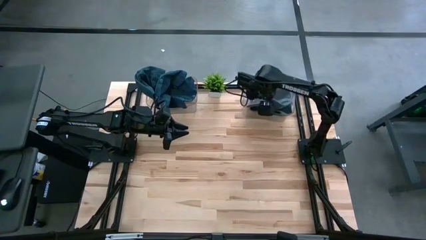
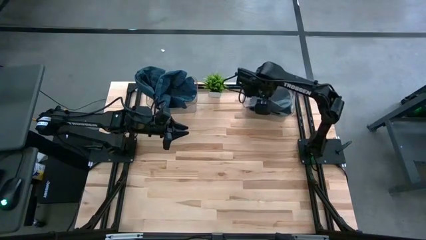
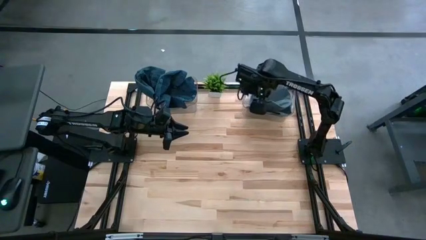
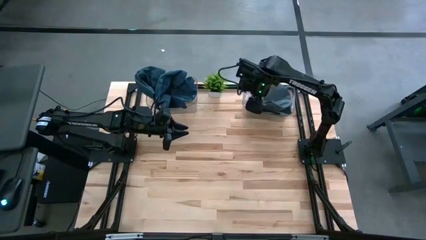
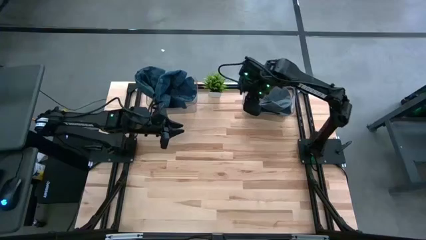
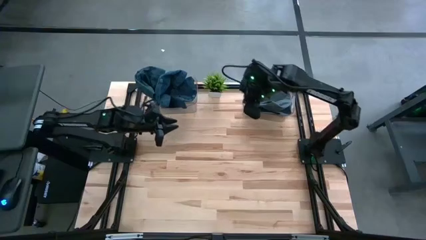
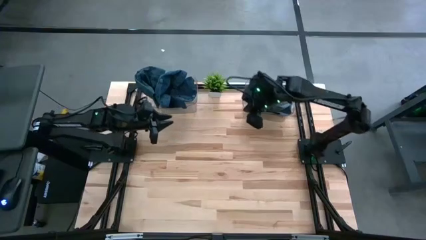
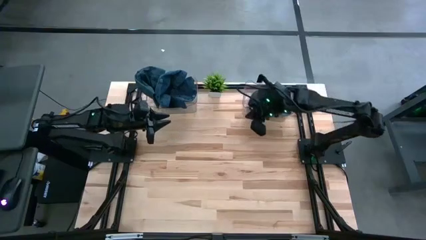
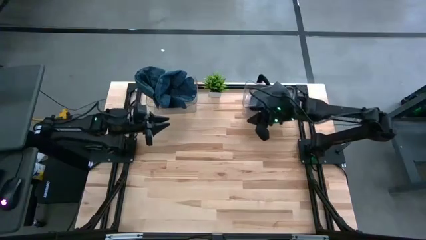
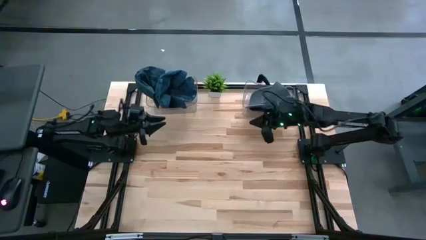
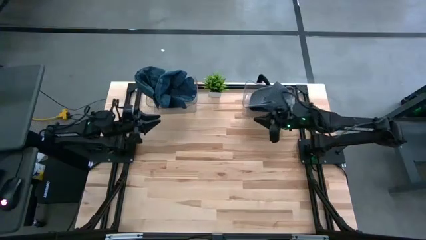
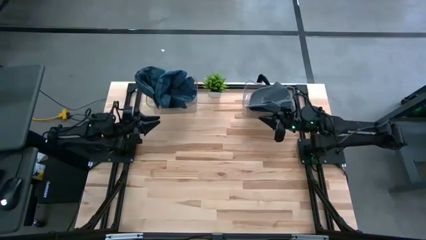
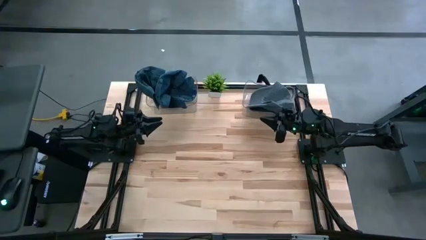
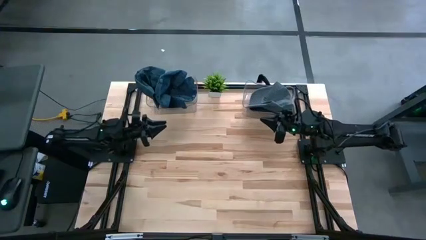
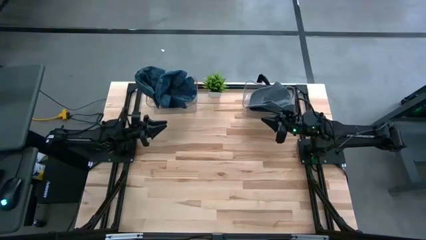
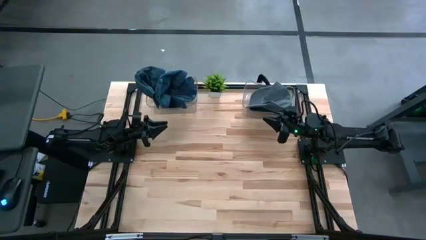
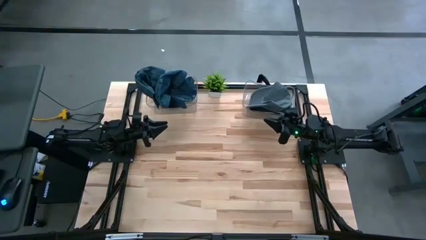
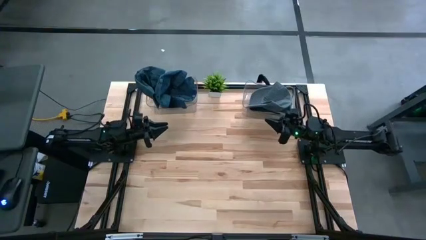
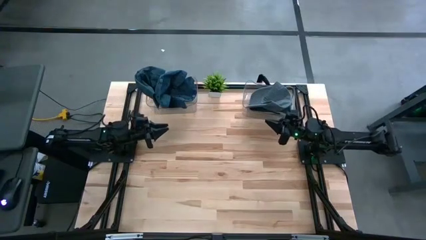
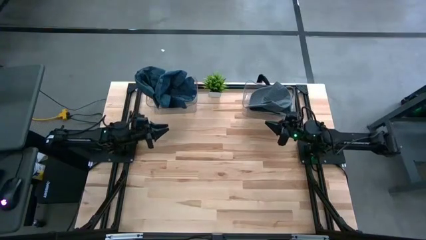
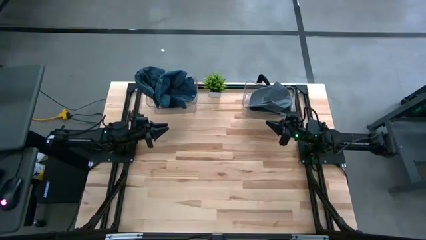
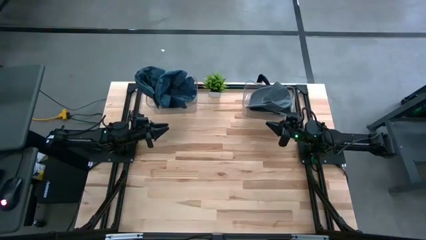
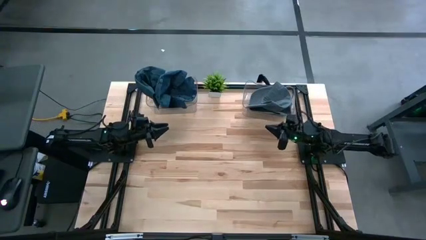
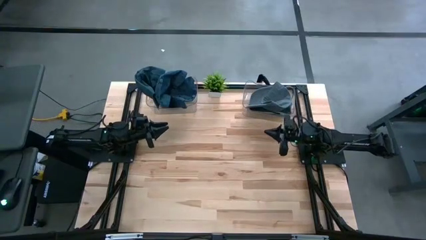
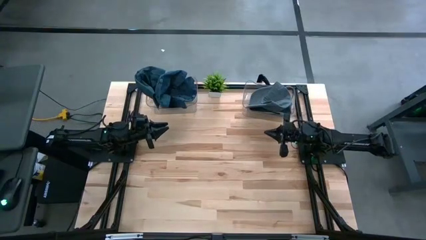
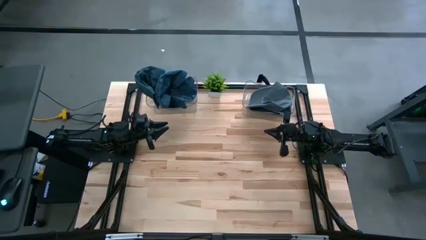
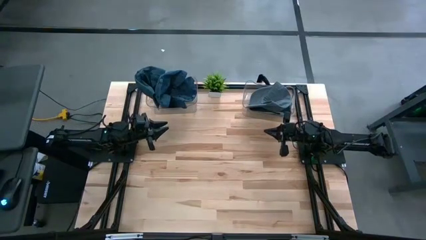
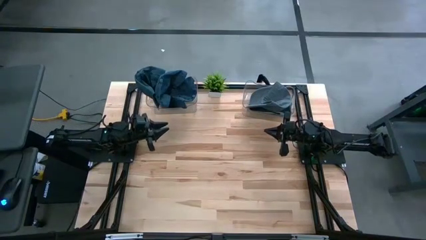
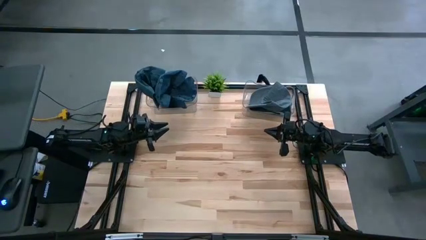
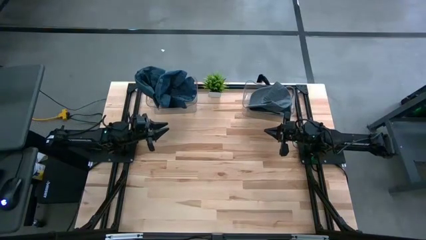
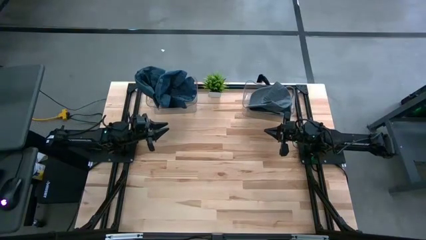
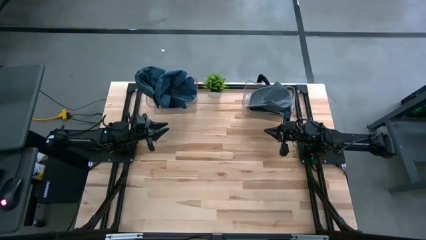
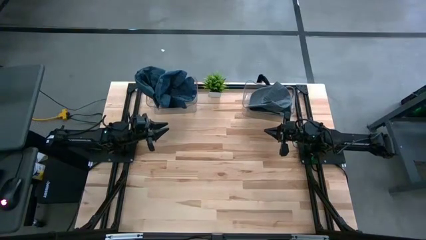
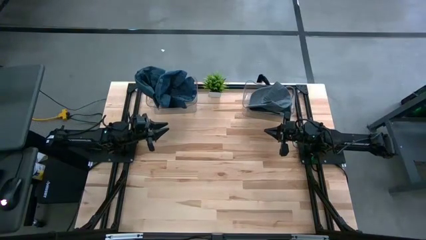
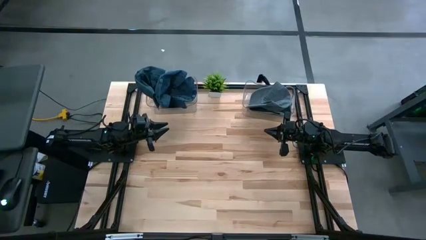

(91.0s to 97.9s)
Task: Pick & Place hat
Return to Home Position

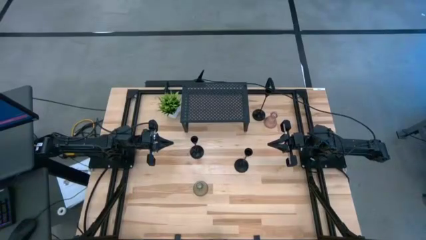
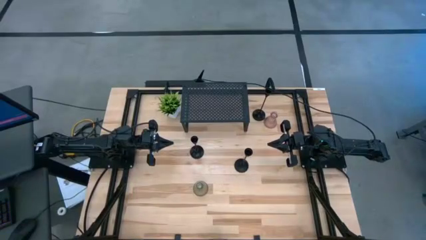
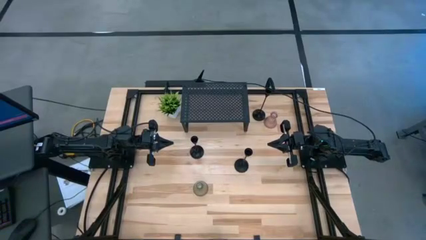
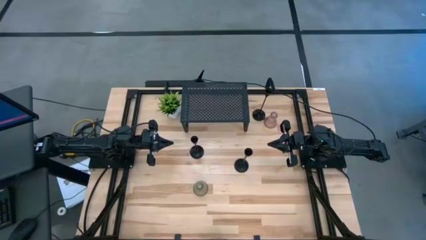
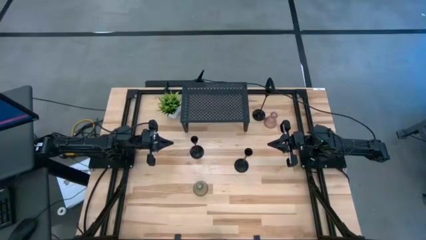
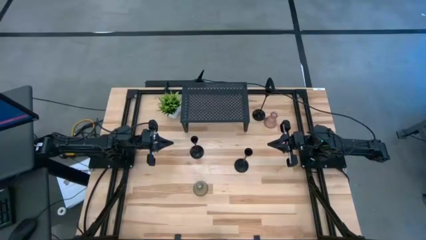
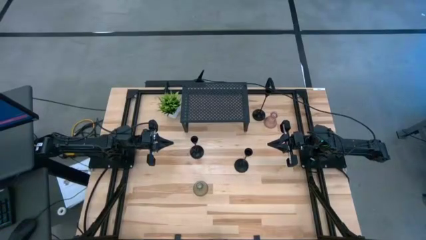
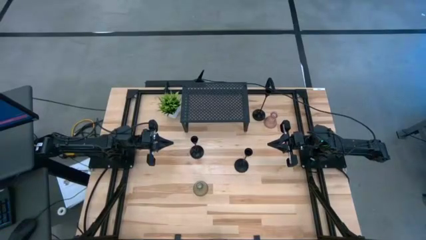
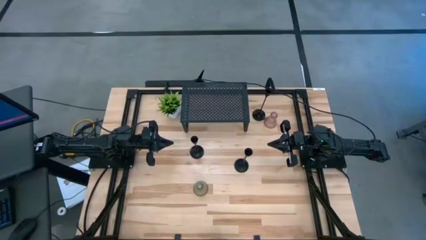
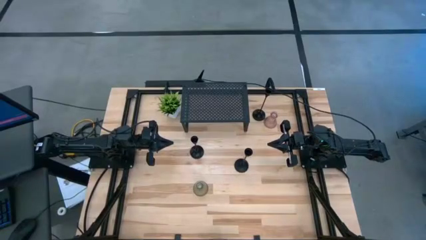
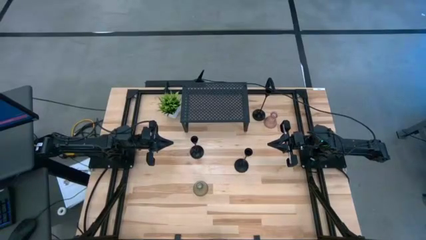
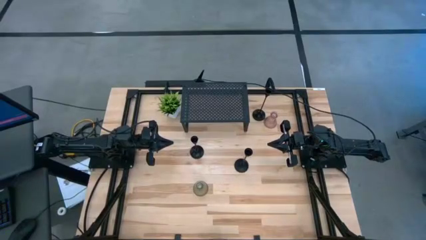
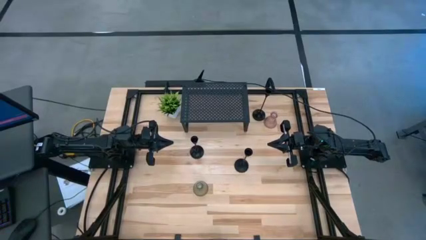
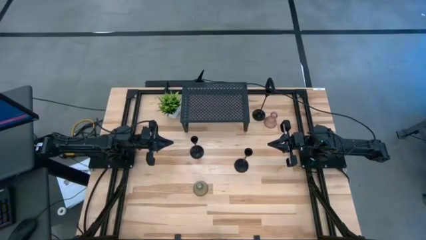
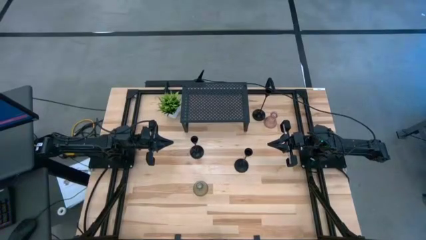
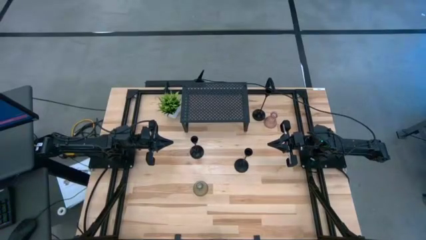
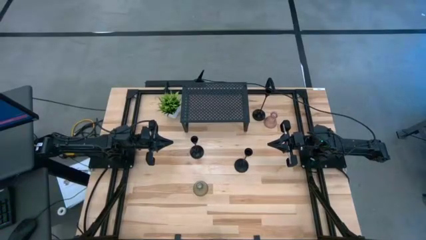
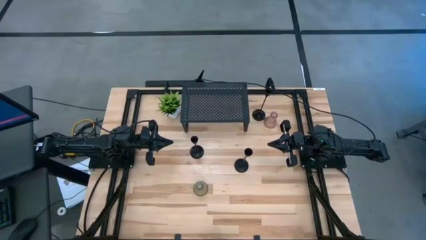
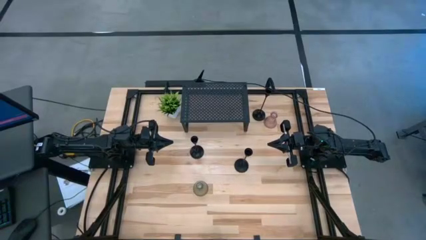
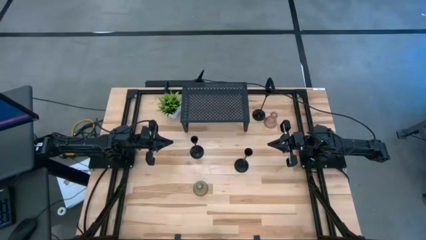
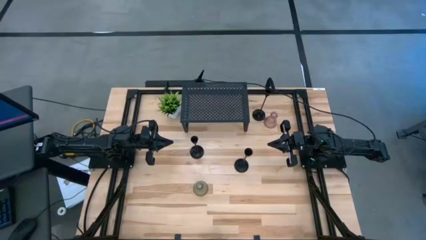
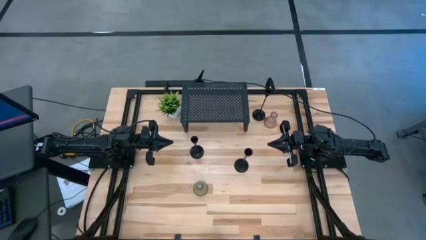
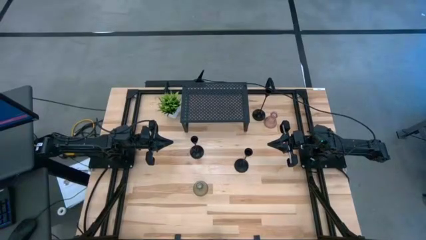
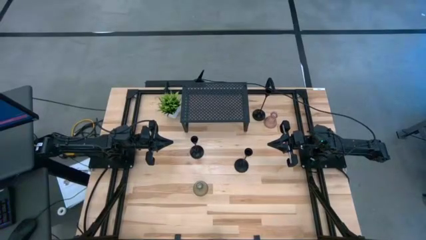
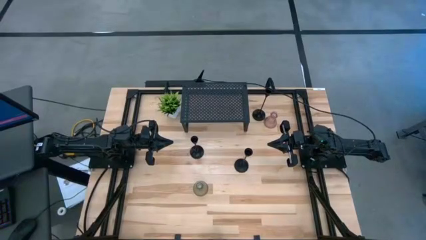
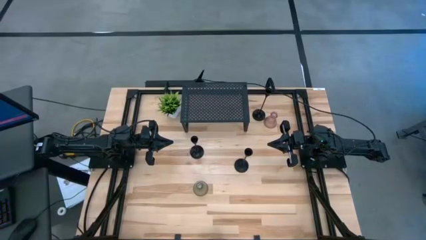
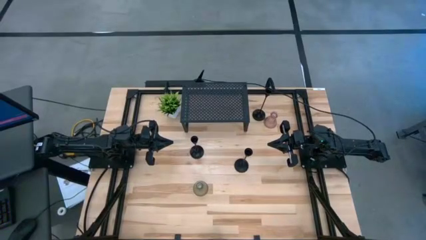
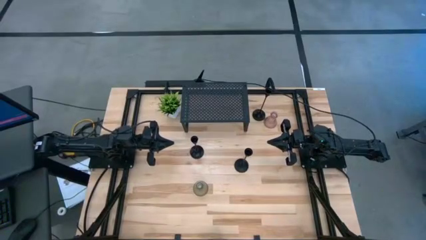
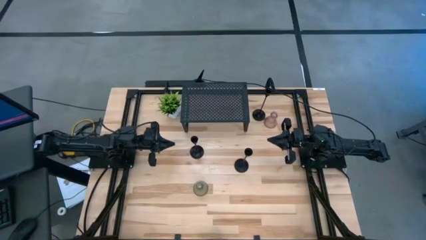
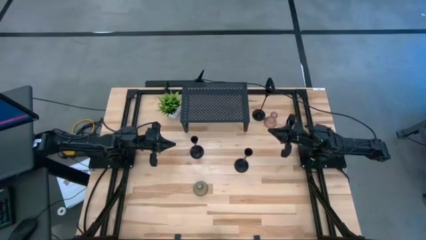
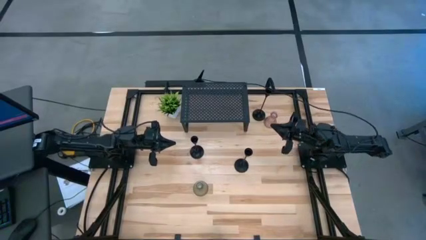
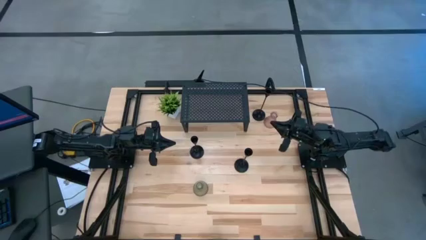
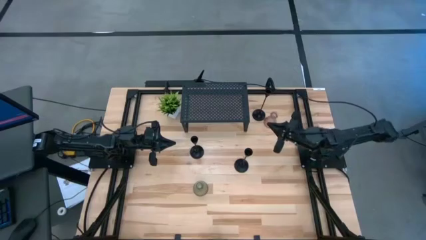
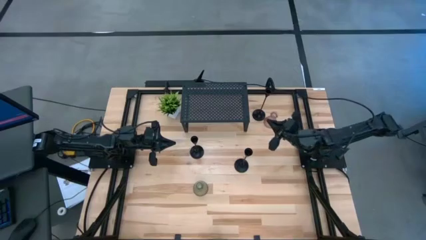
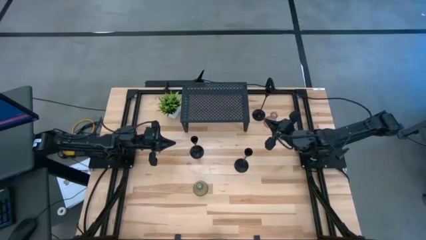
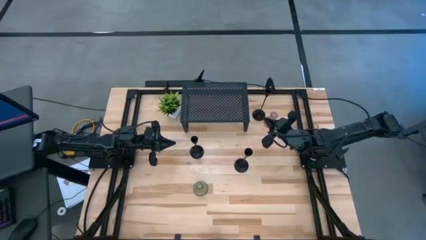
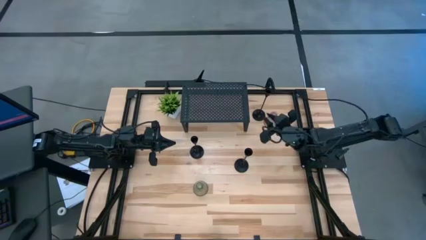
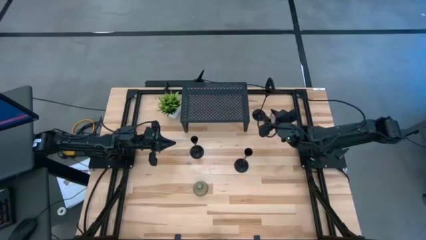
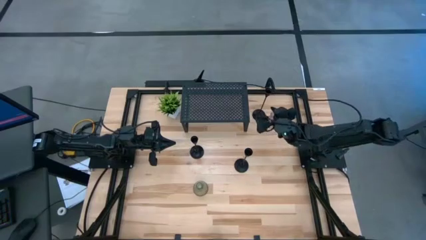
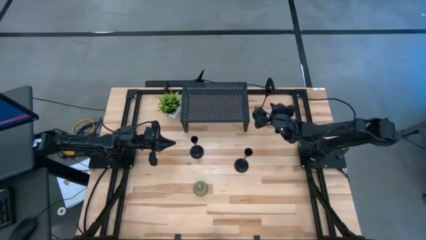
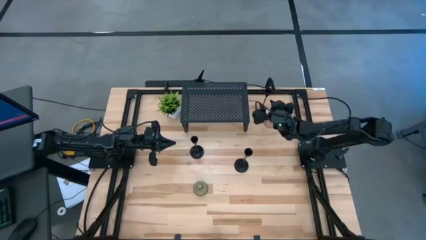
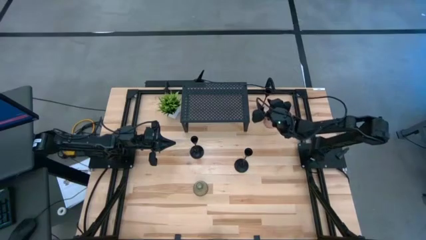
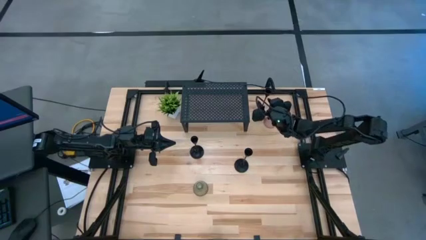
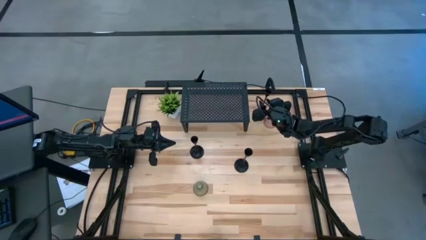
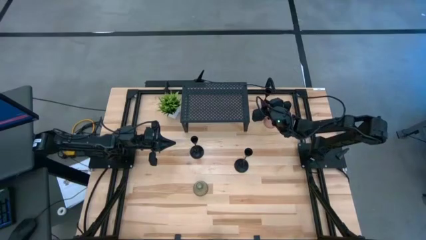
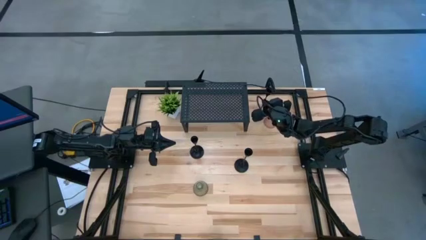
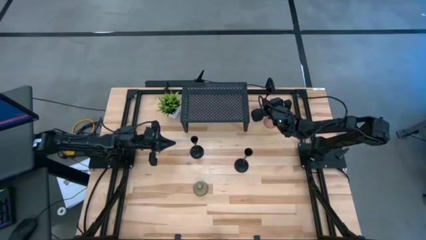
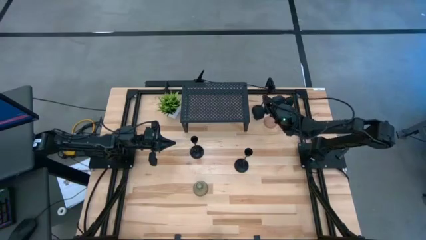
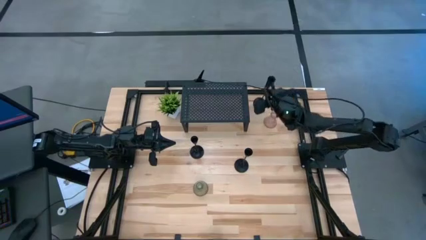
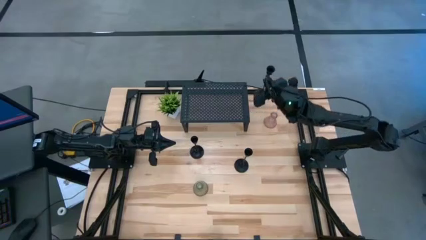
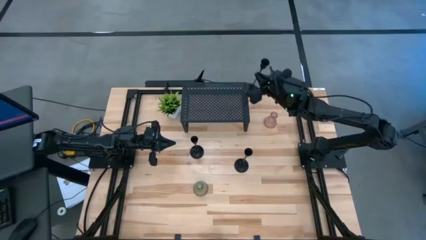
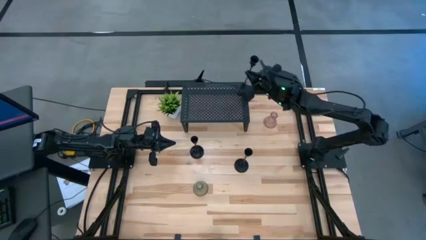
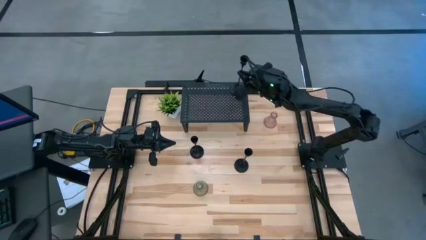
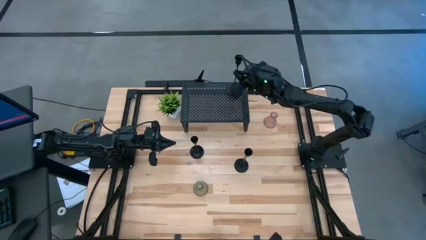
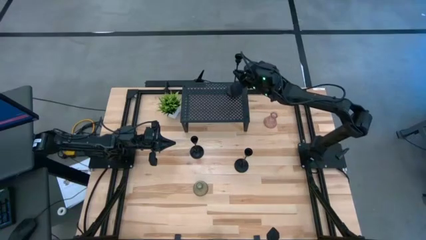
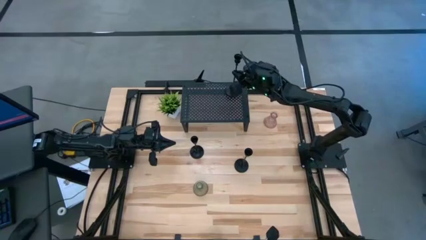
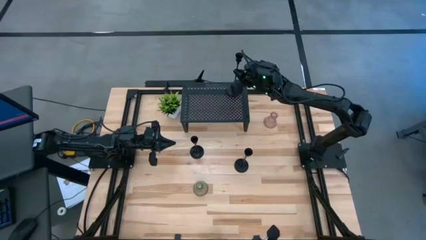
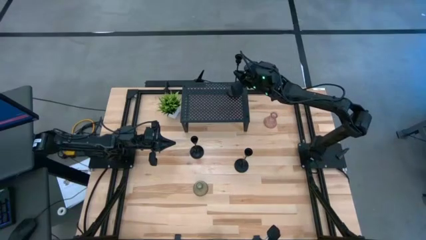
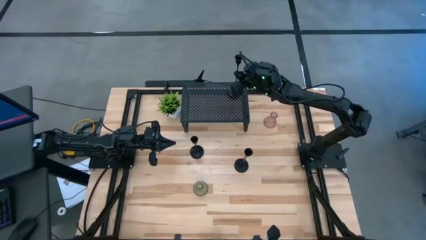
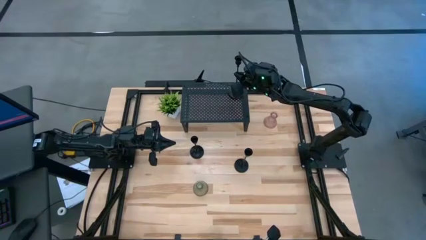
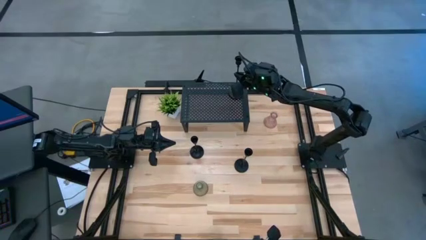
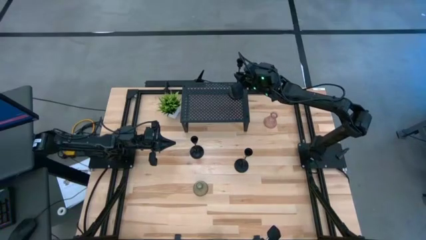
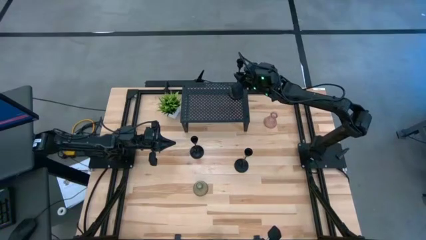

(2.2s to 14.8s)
Task: Pick & Place candle stick holders
Put the black candle holder on the shelf
